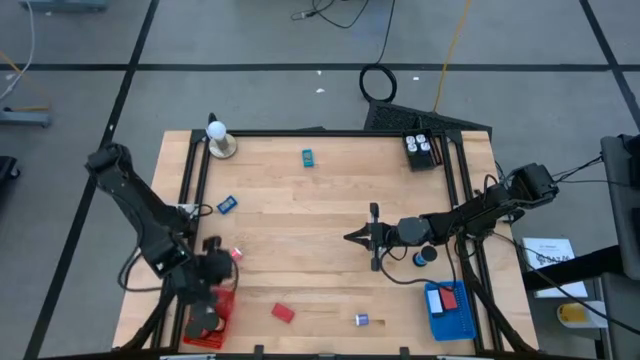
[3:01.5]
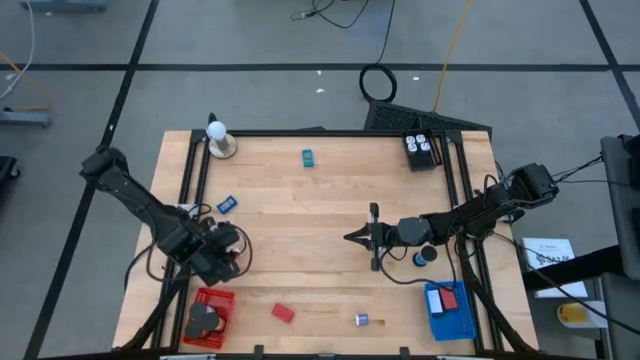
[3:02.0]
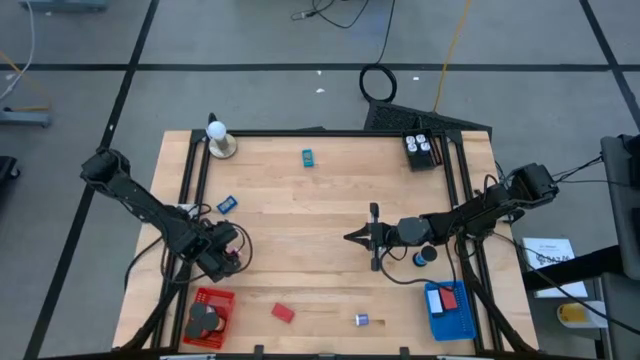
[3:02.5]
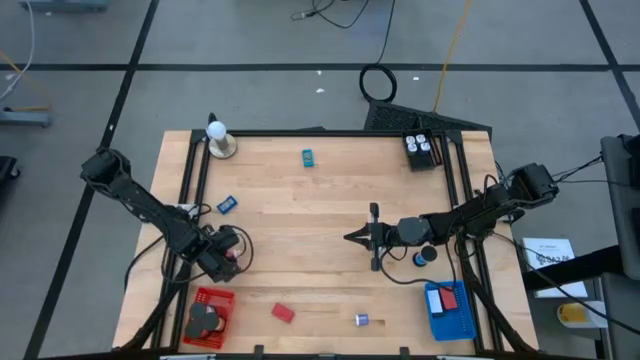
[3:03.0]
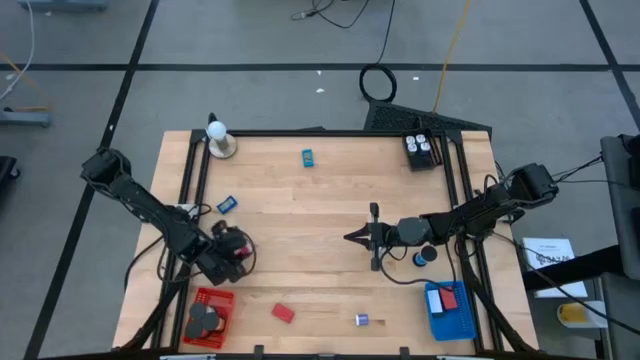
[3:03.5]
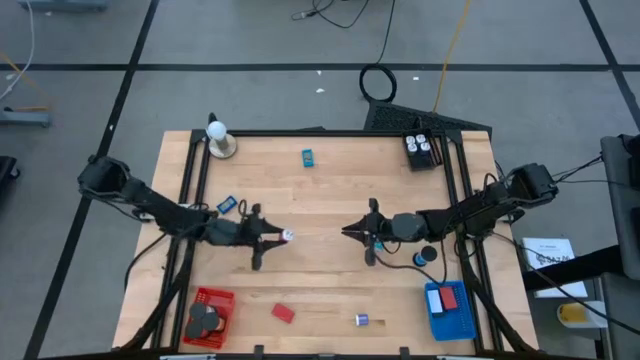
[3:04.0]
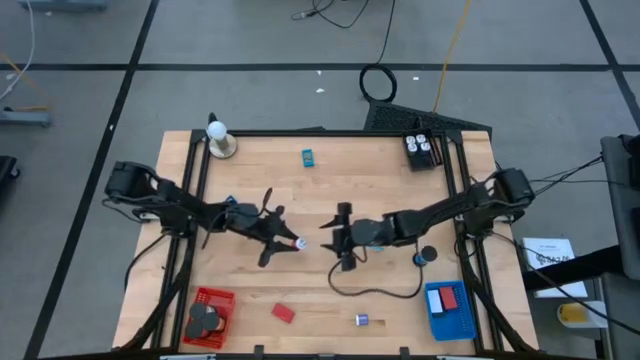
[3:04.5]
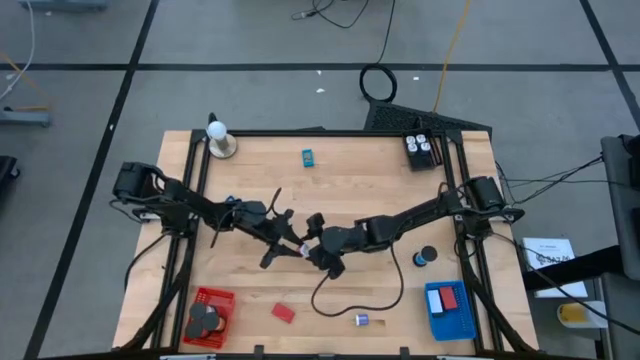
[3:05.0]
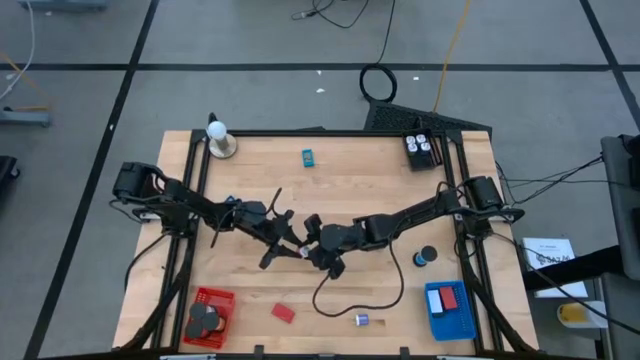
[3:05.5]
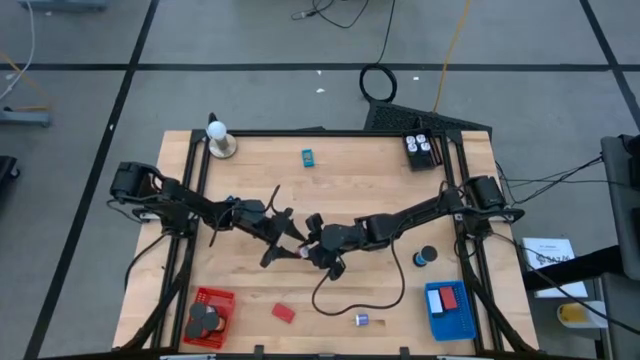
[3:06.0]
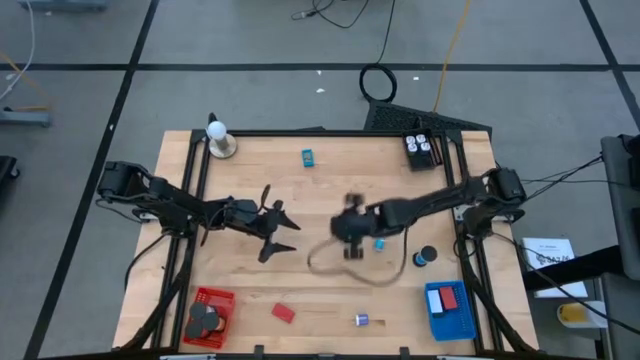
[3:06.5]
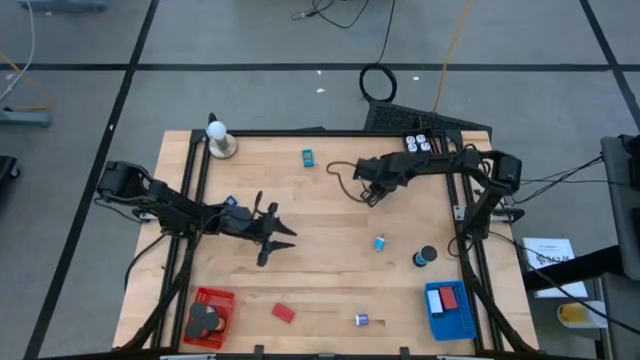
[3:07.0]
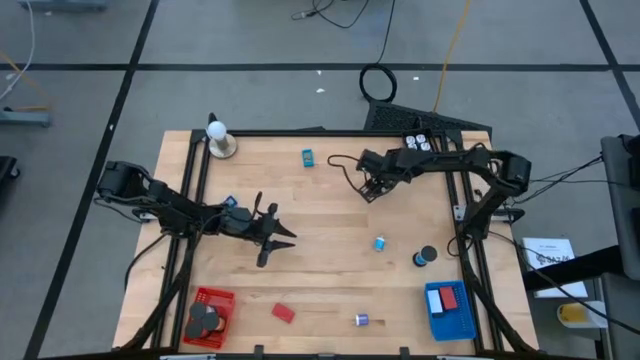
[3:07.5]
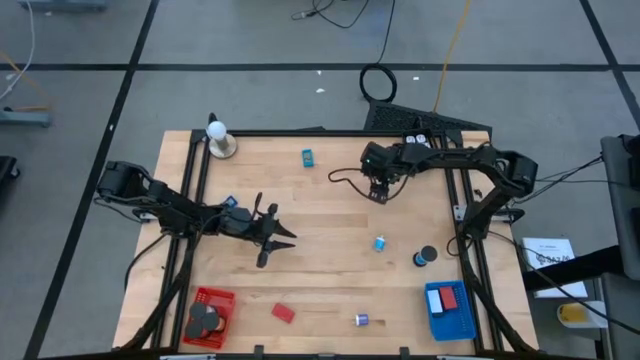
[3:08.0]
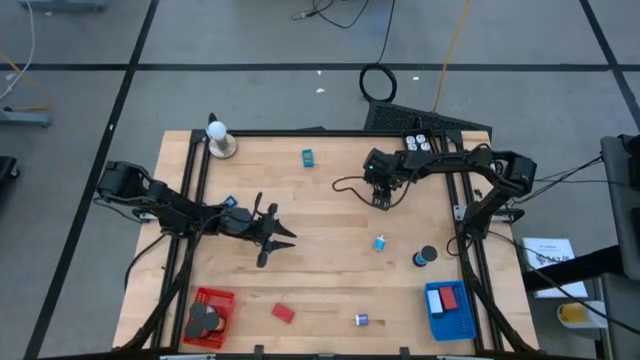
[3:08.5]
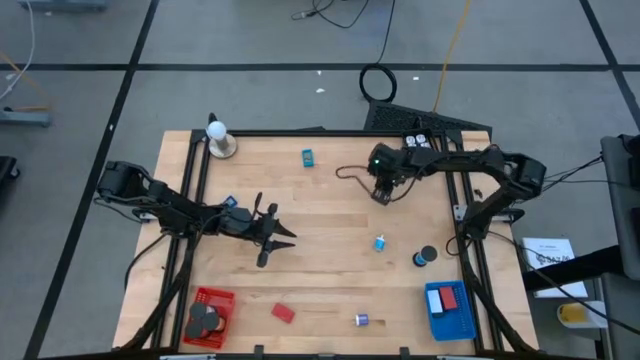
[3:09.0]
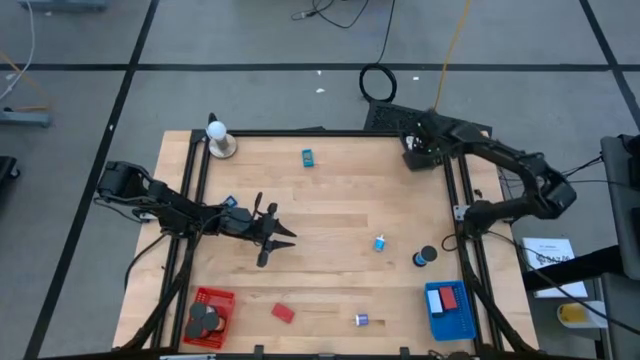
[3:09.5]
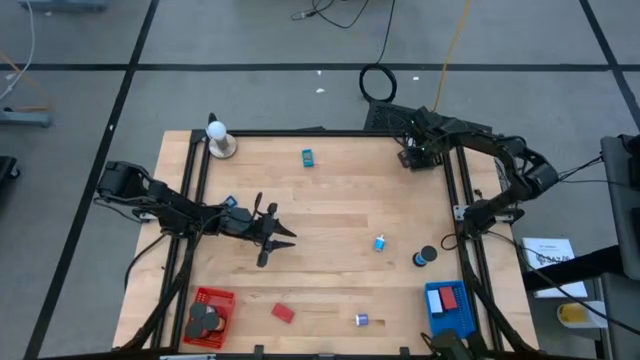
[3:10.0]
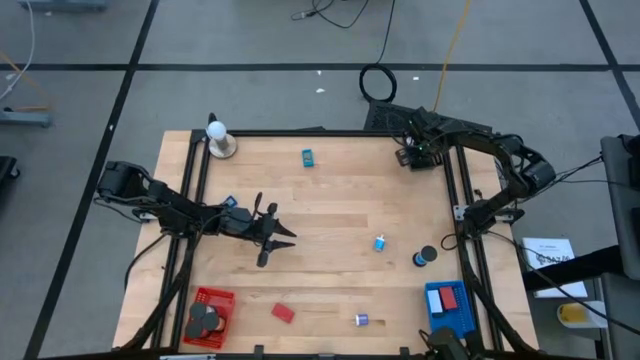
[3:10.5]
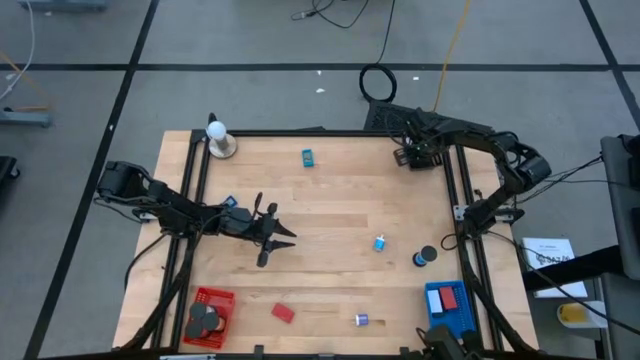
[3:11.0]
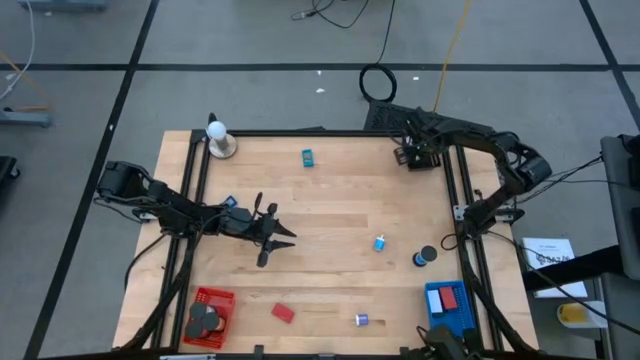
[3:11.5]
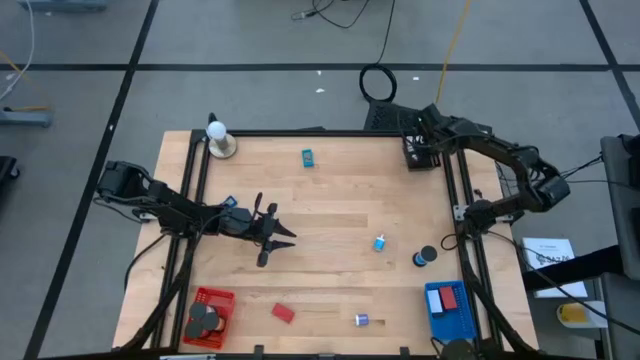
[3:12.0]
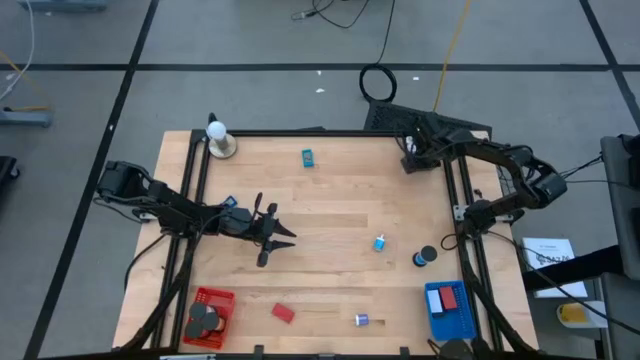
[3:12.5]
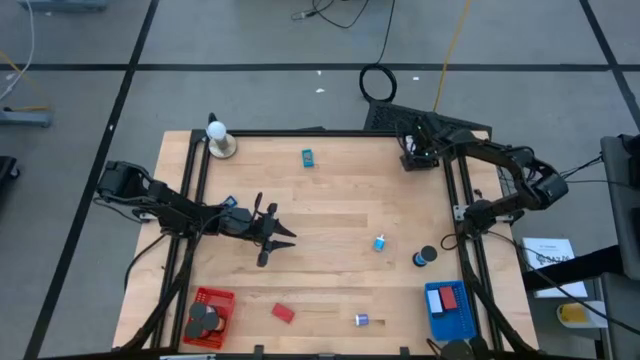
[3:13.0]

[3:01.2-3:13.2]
Task: Pick & Place Office items
Put the pink charger adapter into the black bin

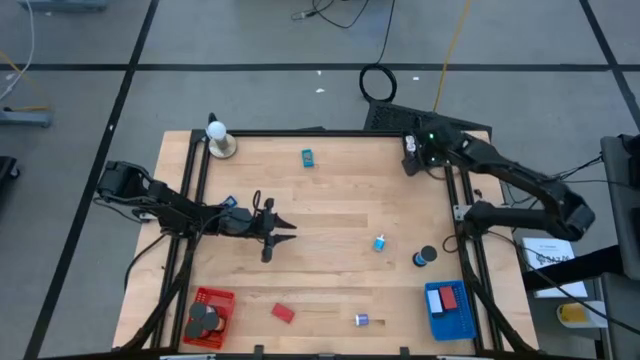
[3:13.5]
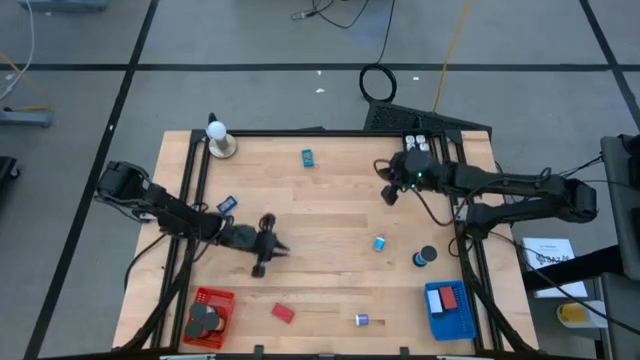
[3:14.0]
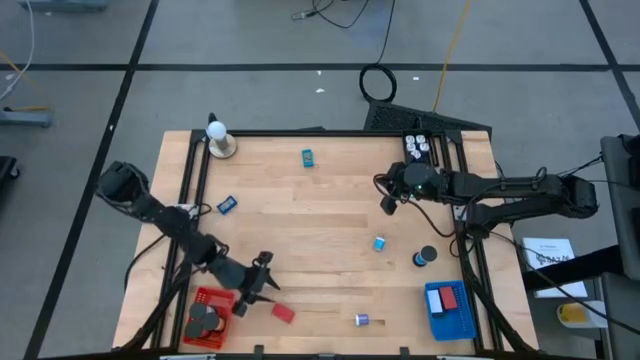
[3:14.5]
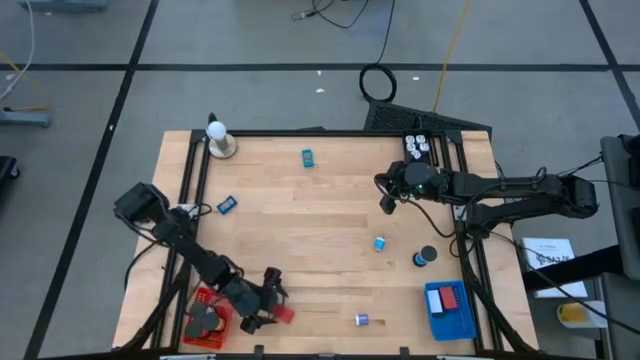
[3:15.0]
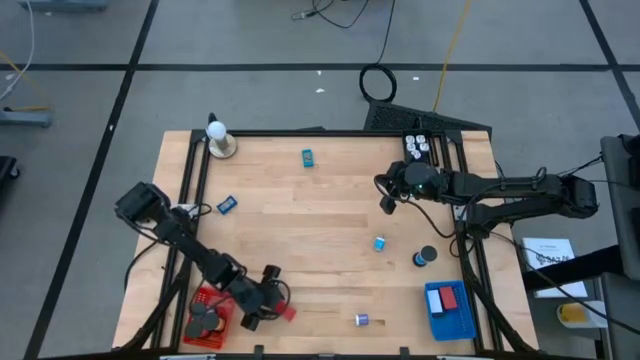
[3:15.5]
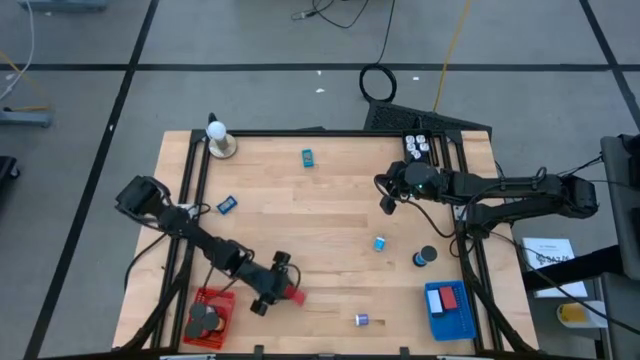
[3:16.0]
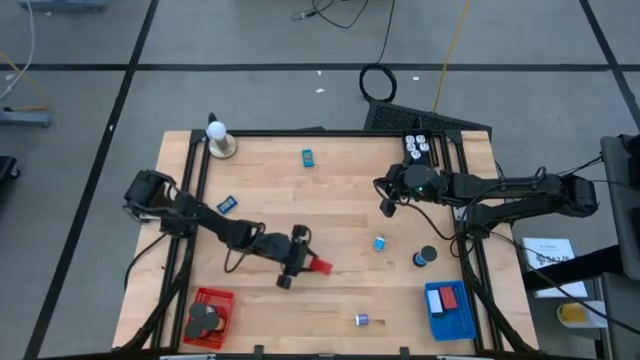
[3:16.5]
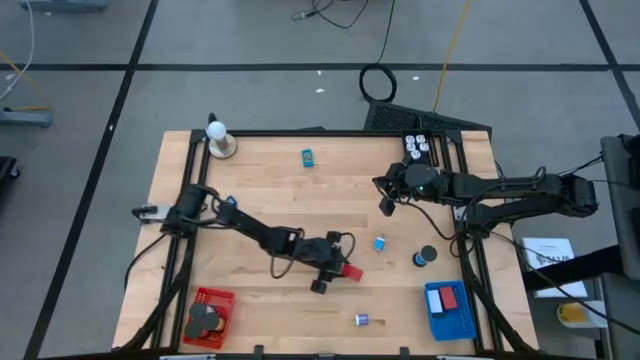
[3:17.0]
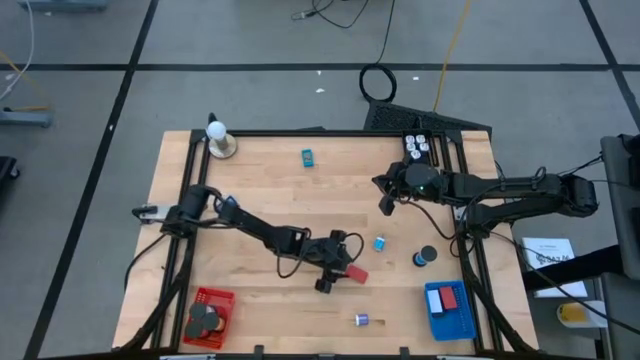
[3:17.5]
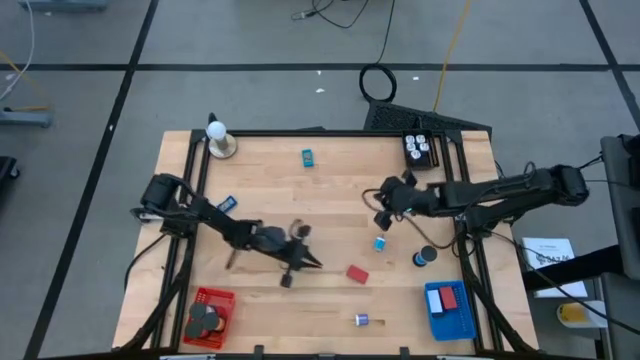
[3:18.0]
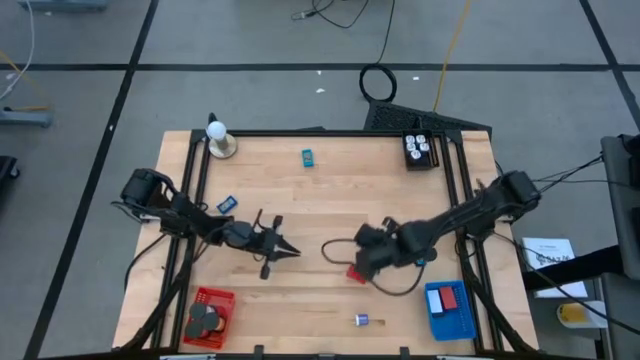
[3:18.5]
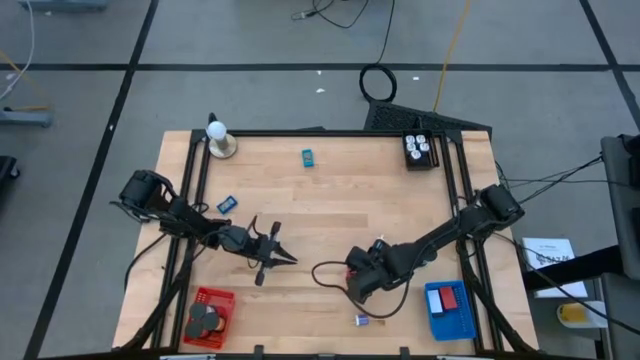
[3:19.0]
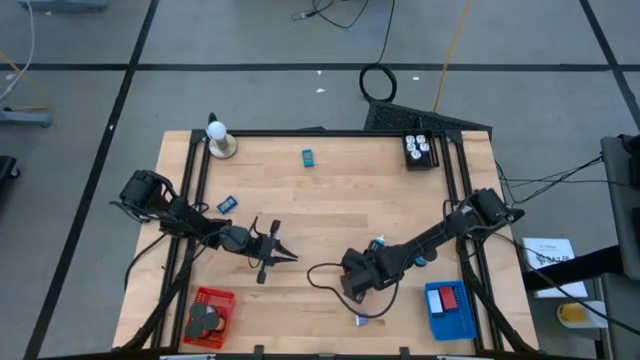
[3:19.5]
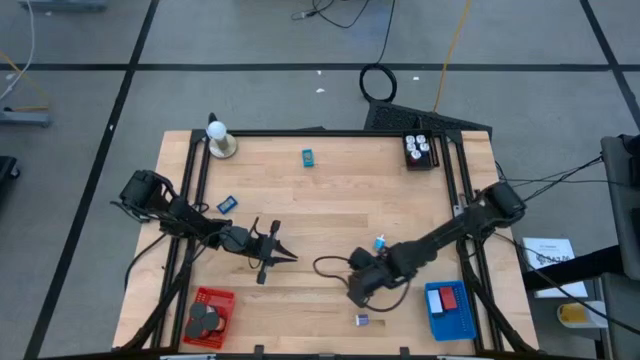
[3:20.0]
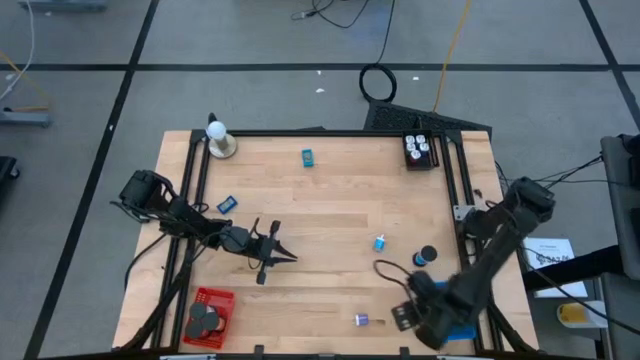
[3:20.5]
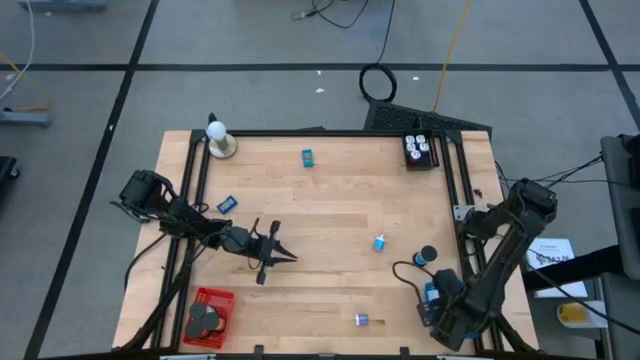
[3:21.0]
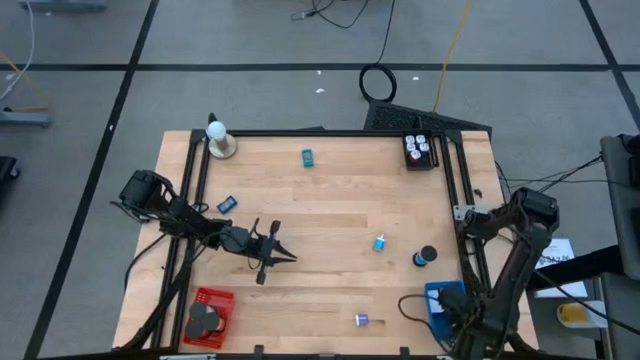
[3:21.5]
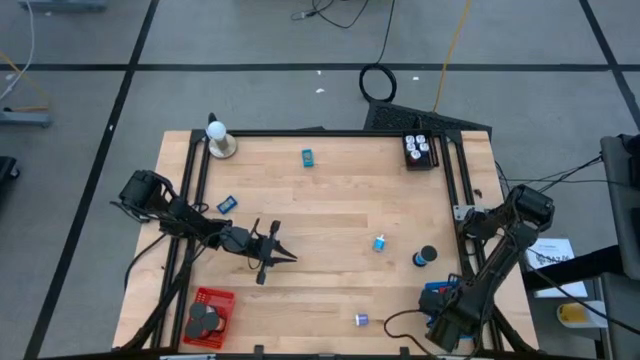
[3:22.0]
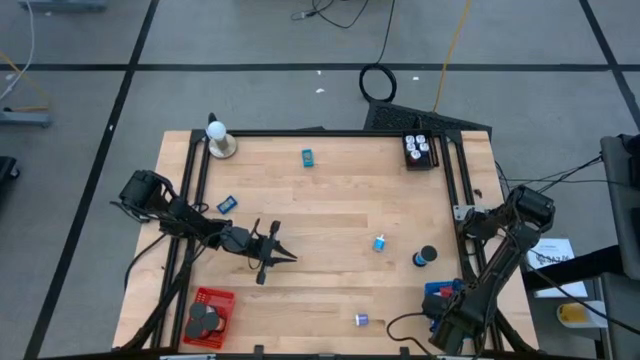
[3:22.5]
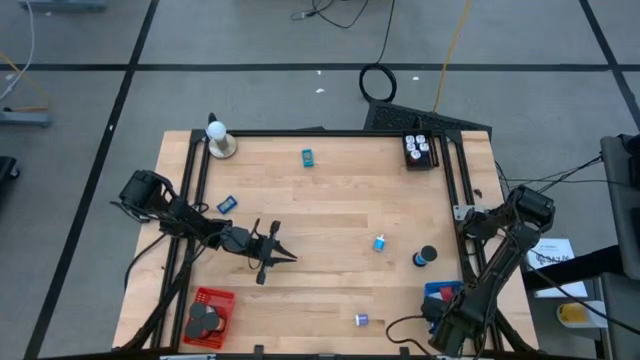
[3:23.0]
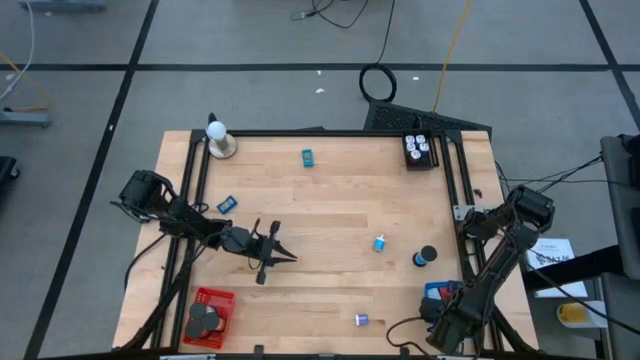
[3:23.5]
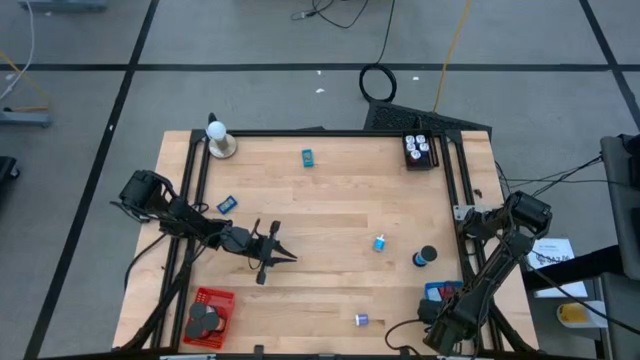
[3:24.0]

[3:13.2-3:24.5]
Put the red digital clock into the blue bin
